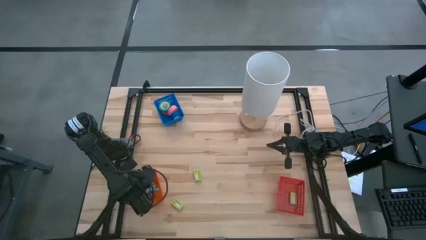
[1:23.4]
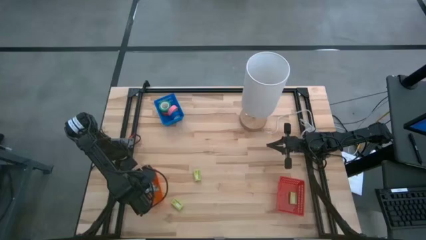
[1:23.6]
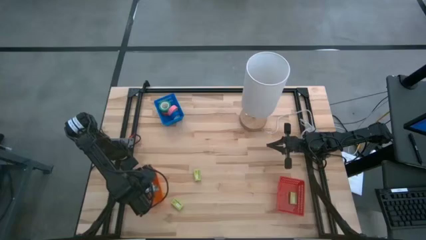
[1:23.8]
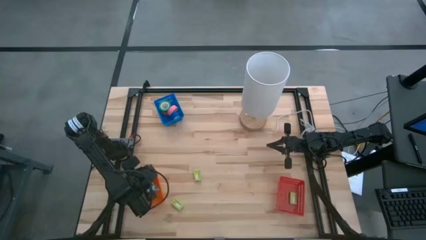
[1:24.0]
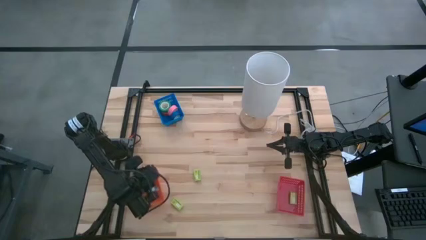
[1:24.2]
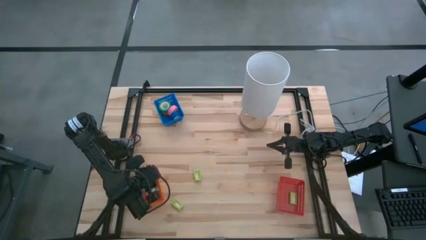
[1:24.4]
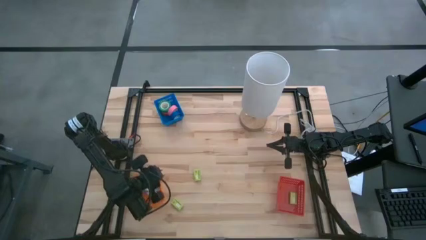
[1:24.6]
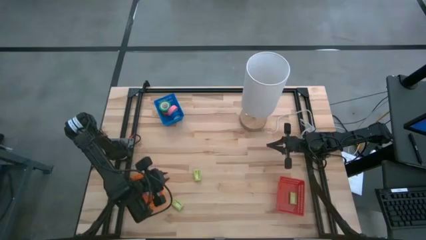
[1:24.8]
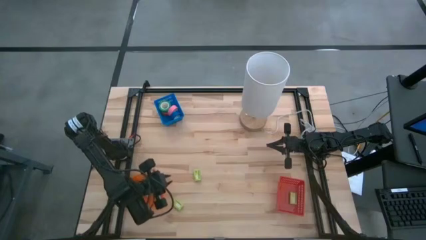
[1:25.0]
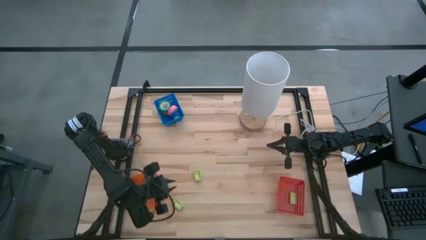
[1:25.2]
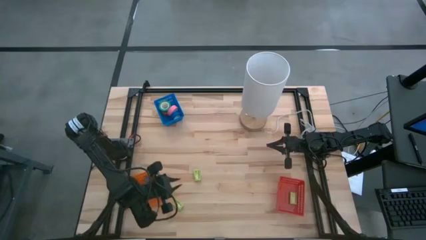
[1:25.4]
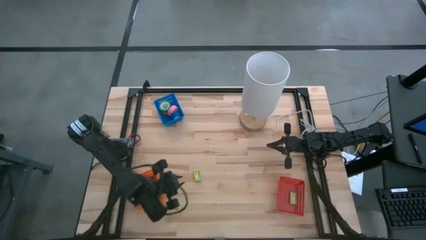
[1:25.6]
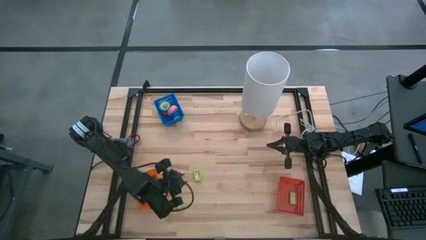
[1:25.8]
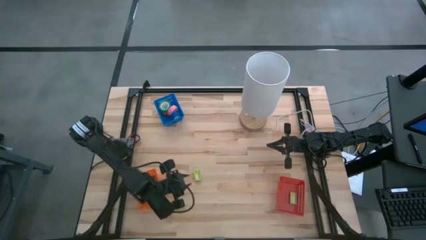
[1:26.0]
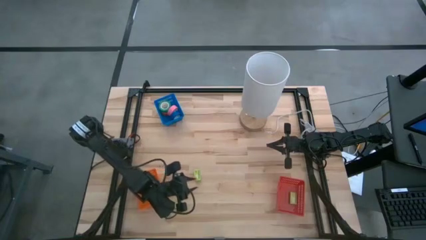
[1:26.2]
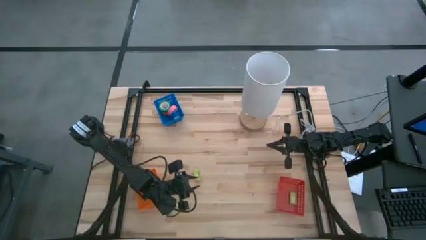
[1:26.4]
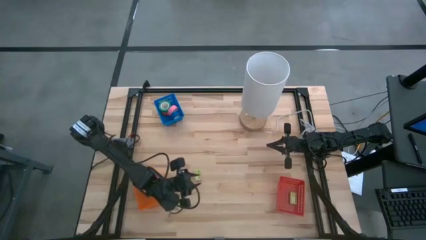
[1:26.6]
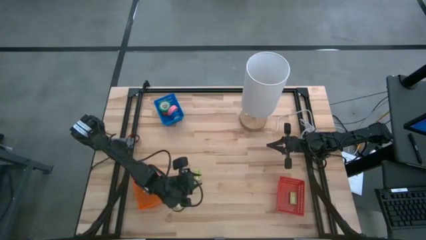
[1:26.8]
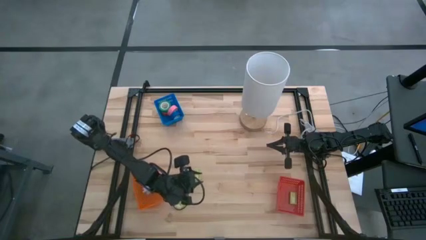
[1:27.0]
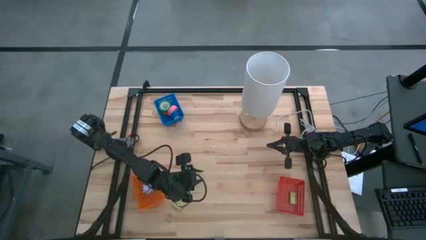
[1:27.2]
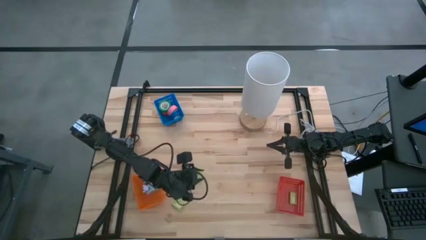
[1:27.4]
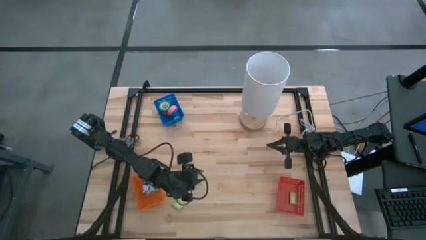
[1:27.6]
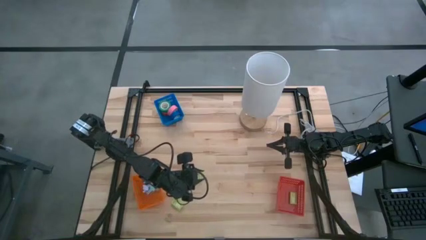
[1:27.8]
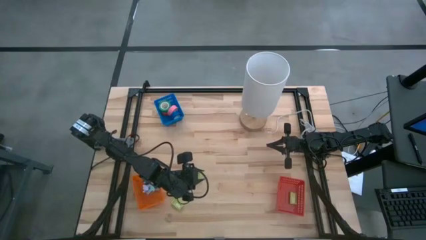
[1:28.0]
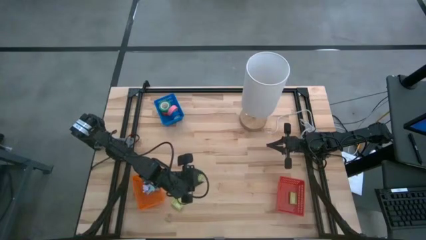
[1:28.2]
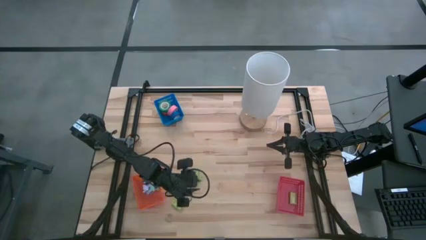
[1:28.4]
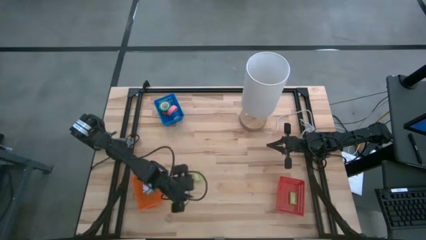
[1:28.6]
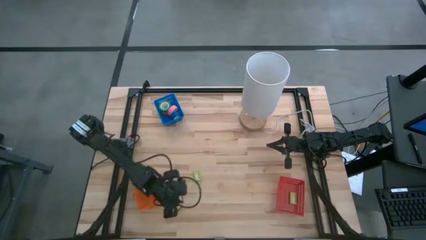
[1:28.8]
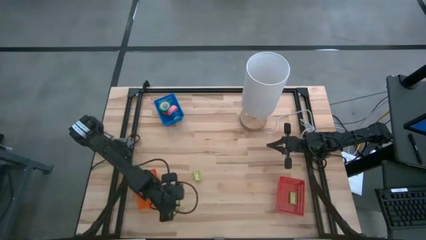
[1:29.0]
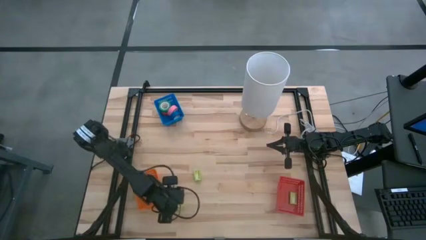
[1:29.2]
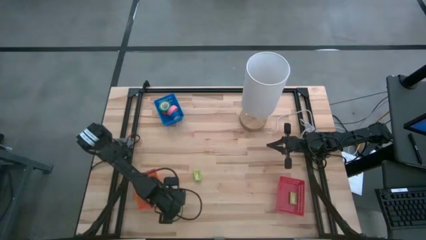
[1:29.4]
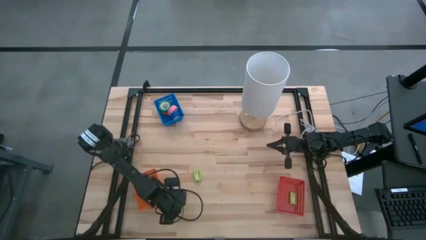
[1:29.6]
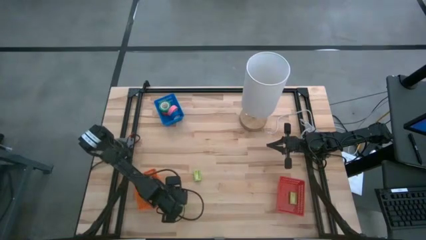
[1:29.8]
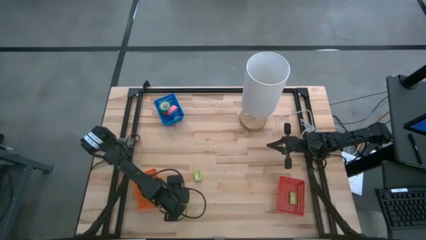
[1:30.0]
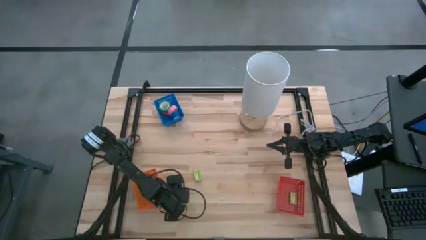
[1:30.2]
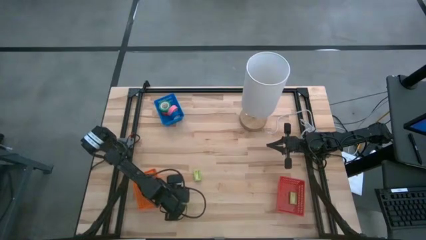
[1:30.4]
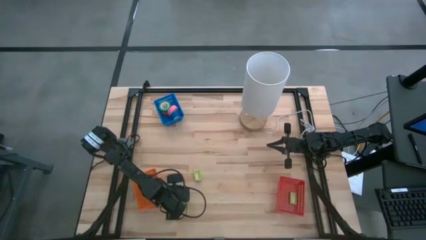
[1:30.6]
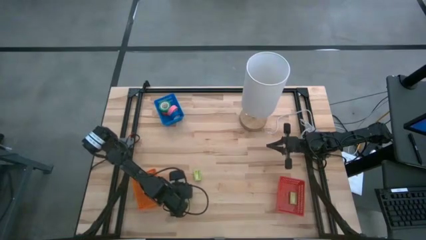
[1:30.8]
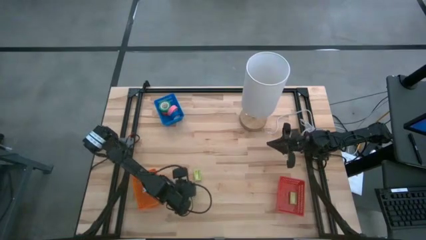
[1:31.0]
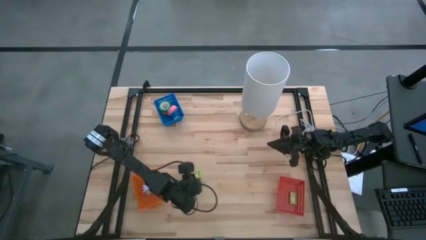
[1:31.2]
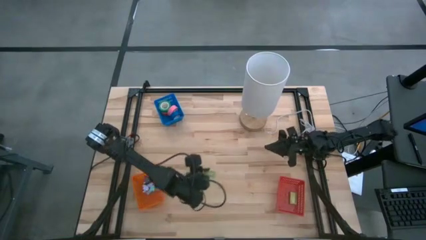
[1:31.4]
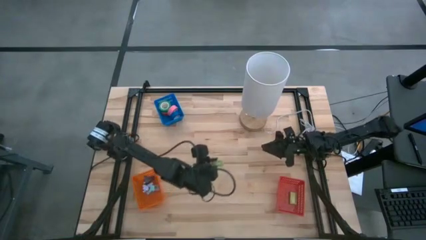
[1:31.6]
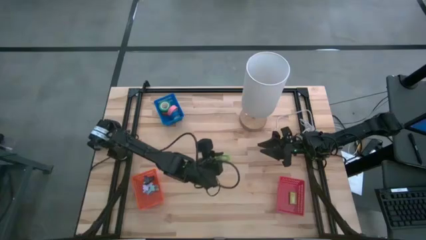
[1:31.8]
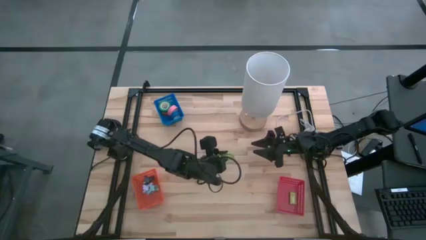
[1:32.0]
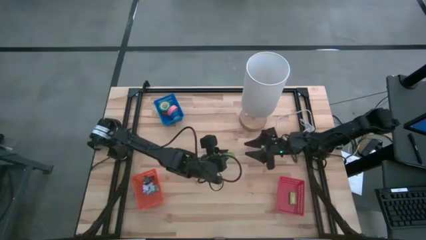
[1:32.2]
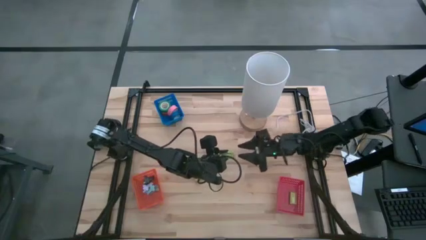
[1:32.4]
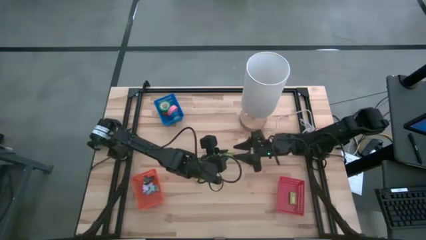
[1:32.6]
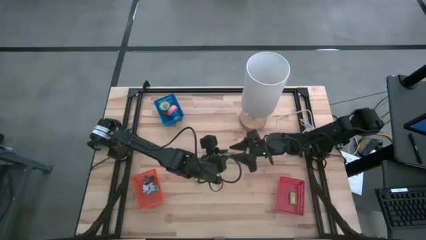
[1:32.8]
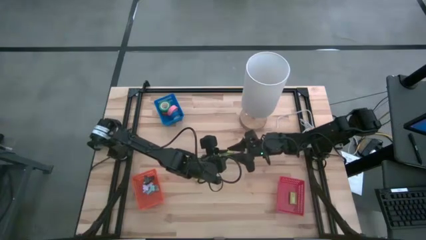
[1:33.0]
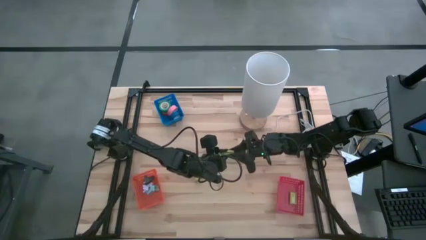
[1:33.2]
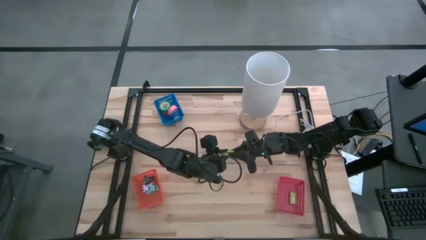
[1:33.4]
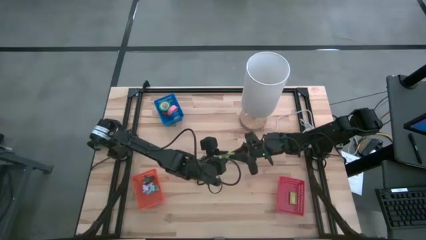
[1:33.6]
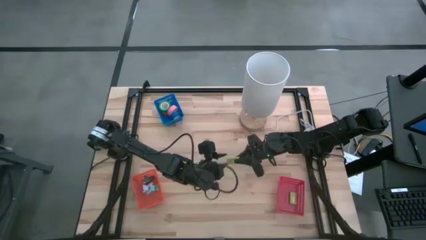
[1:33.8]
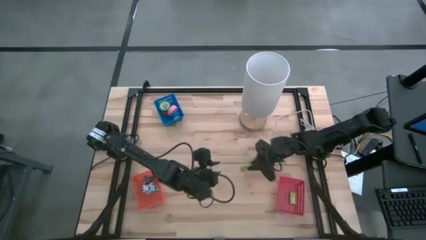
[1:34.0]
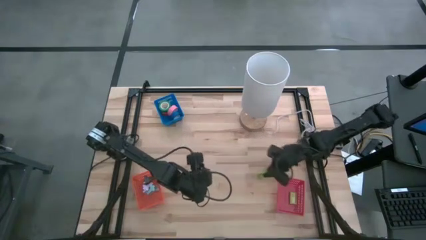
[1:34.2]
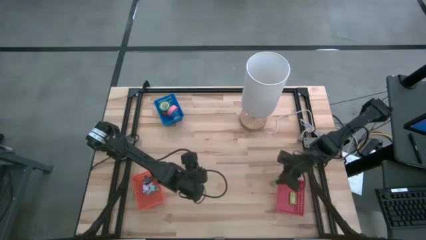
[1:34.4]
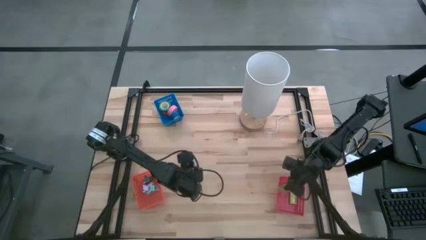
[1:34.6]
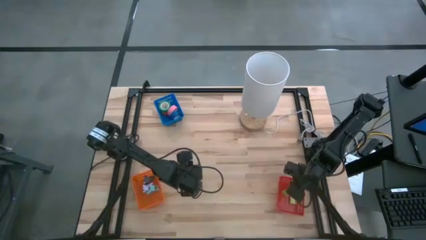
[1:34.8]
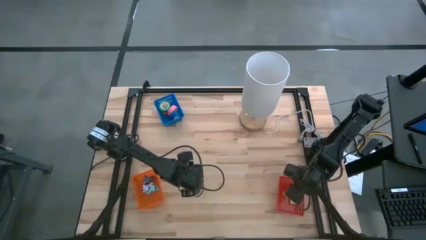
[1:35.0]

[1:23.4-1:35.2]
Task: Pick and place Stapler, Stapler remover, tape
Put the bottom green stapler pin box into the red basket

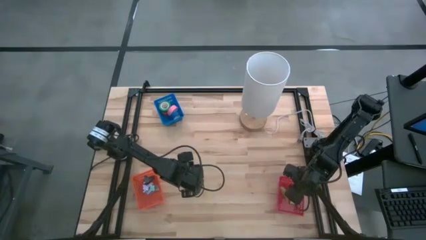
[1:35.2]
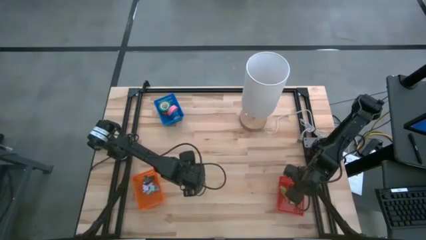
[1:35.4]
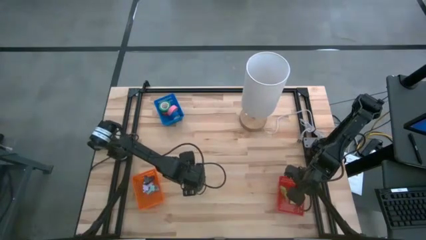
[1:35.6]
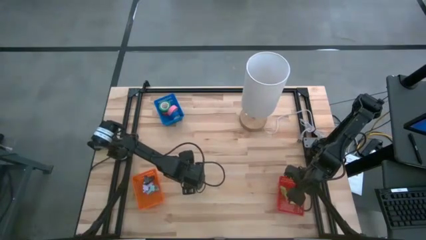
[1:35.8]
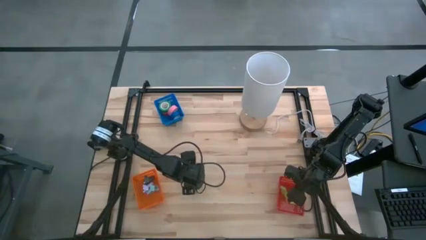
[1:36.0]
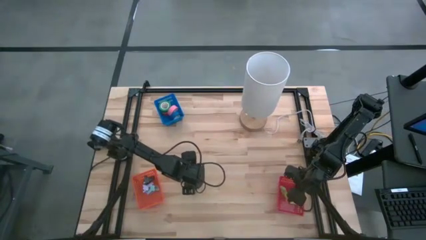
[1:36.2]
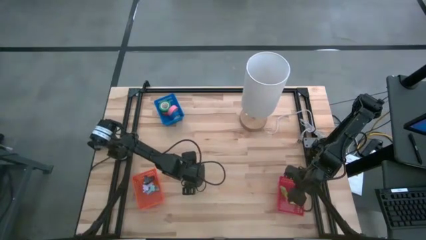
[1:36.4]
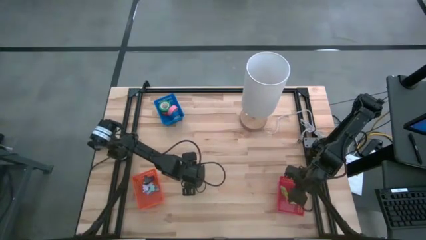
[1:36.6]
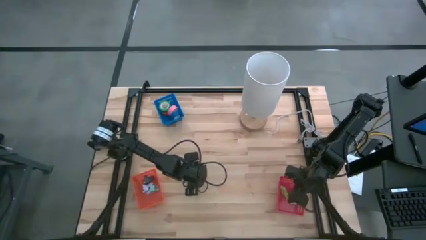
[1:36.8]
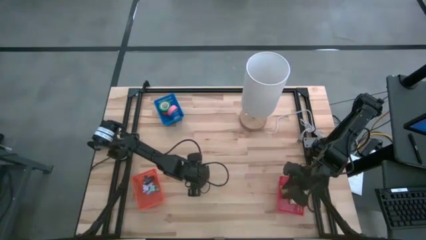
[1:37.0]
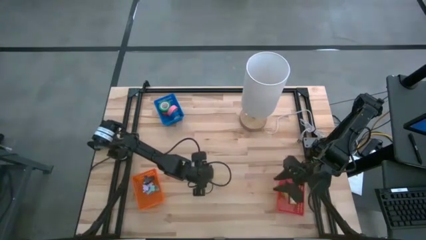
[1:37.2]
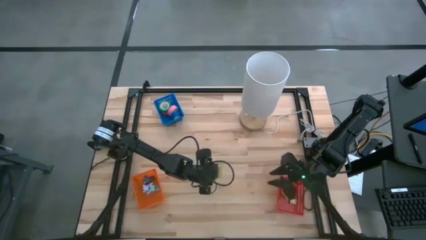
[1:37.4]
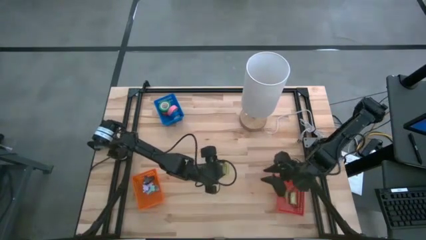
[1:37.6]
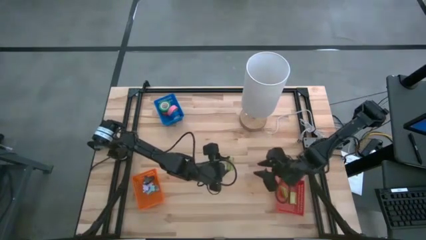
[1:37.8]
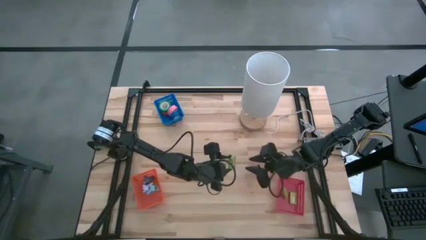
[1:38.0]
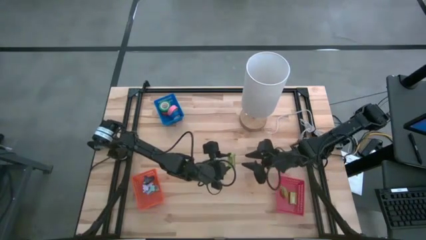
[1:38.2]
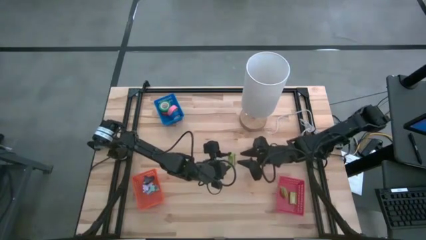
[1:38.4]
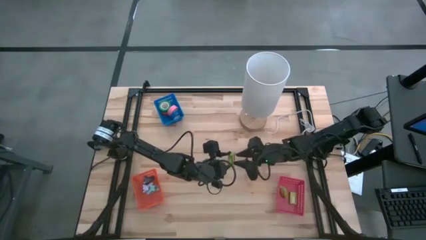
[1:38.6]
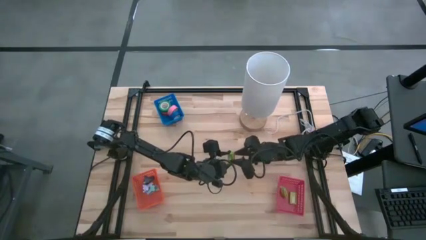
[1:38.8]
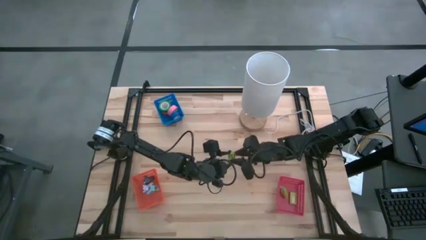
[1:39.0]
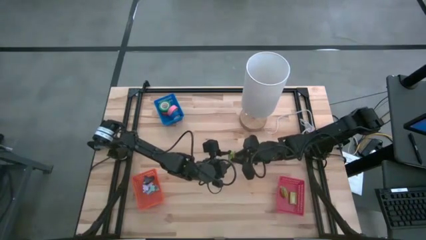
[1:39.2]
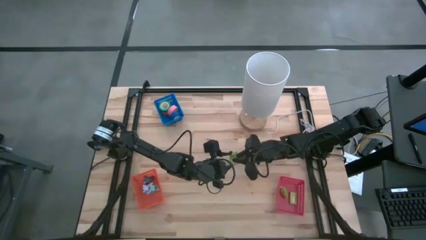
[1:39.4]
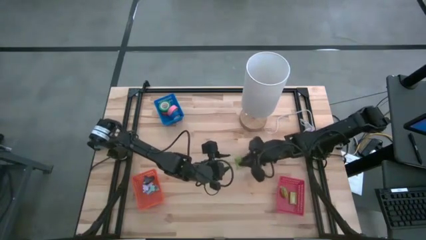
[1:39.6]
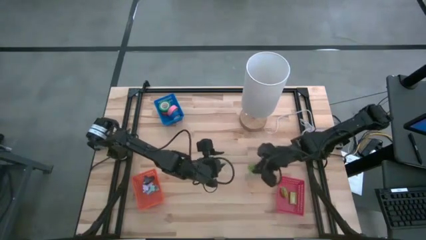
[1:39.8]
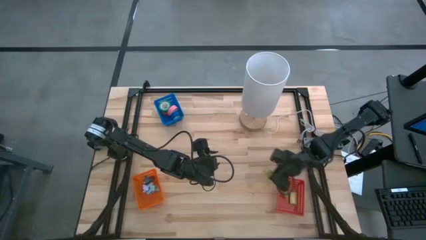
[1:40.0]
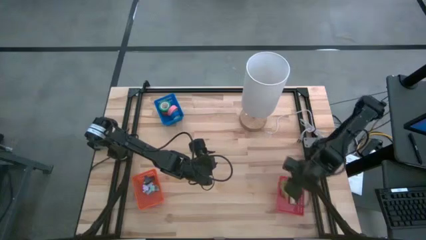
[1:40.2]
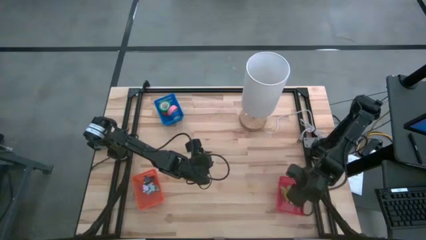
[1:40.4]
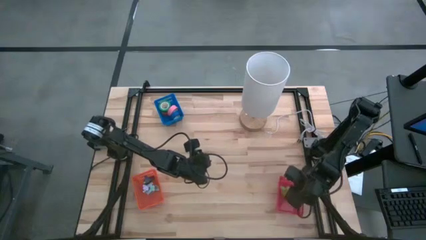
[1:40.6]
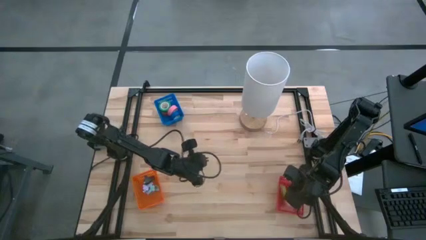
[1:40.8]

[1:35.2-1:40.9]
Put the green stapler pin box into the red basket
